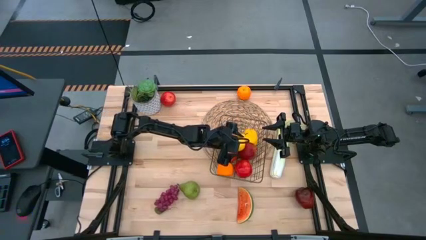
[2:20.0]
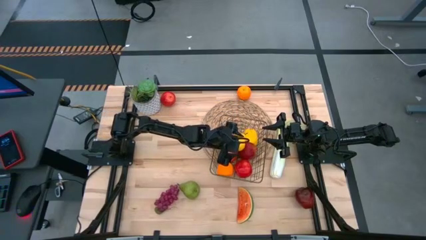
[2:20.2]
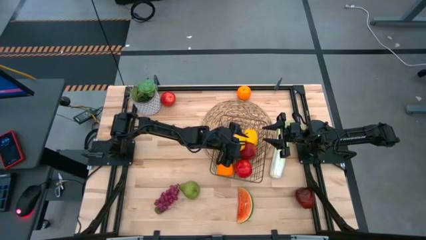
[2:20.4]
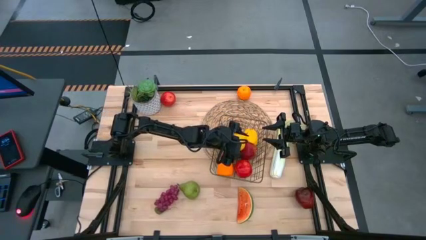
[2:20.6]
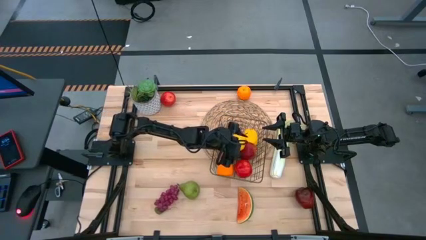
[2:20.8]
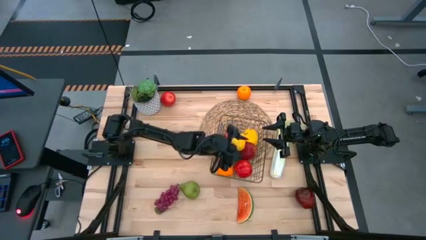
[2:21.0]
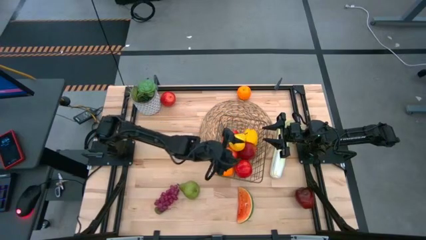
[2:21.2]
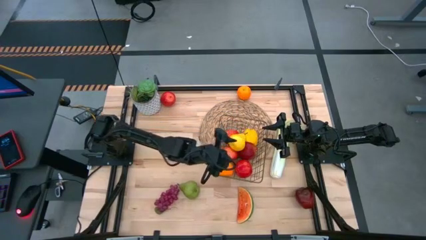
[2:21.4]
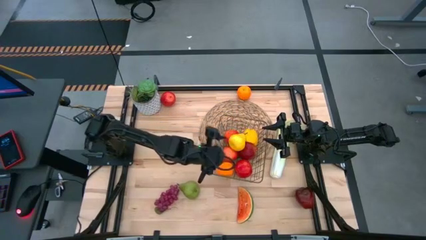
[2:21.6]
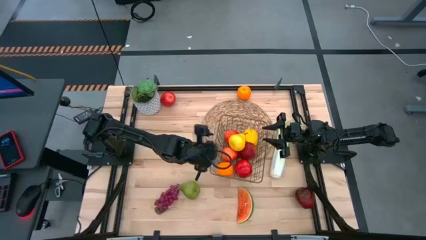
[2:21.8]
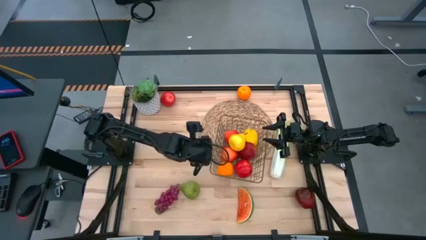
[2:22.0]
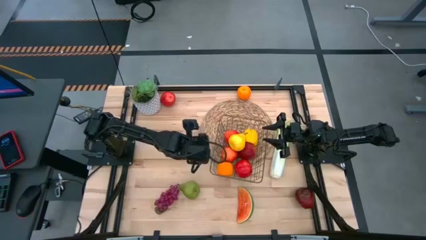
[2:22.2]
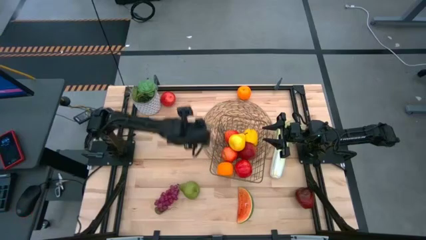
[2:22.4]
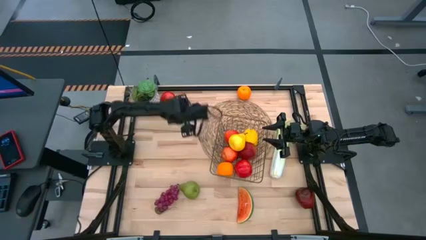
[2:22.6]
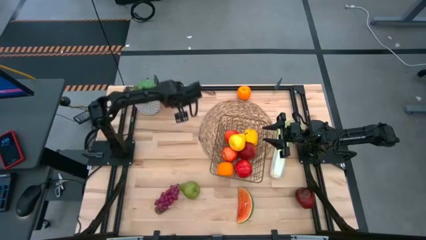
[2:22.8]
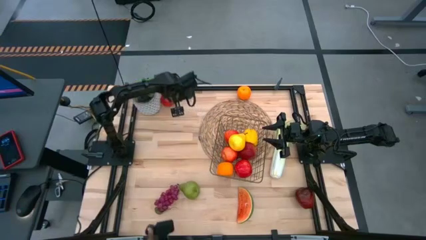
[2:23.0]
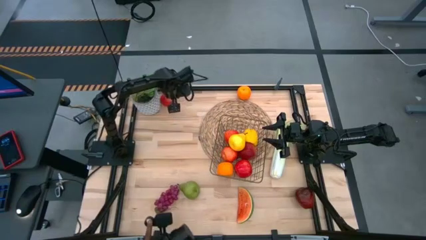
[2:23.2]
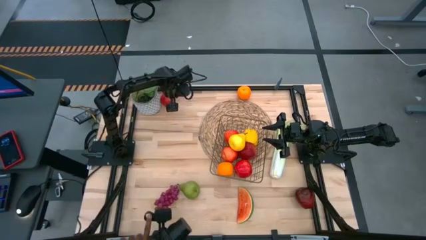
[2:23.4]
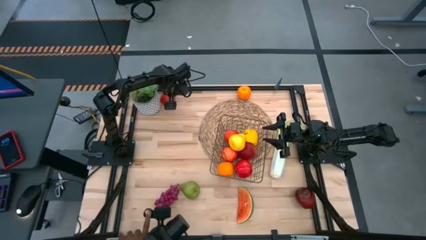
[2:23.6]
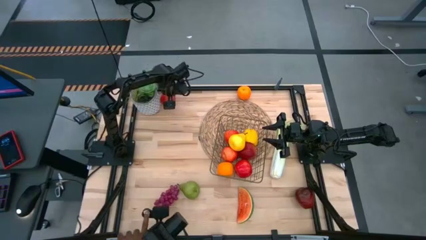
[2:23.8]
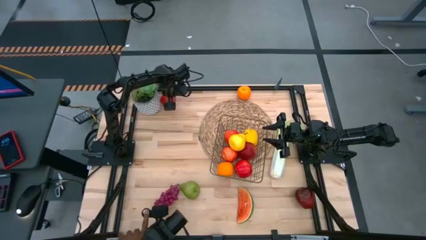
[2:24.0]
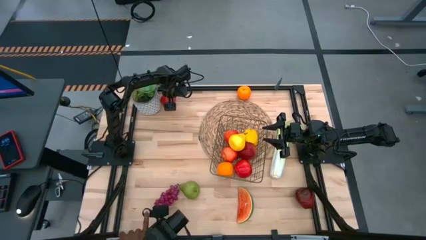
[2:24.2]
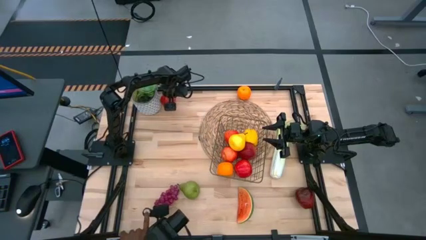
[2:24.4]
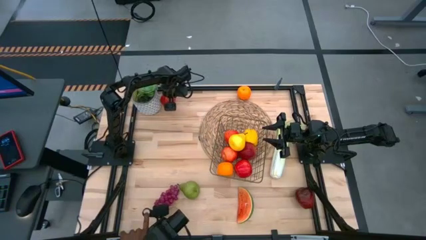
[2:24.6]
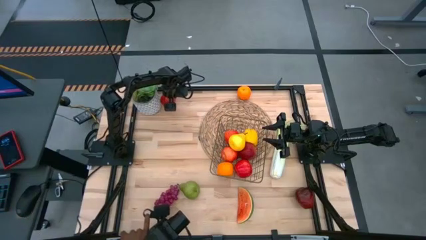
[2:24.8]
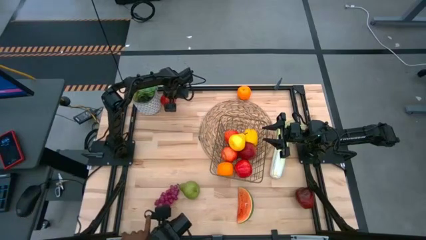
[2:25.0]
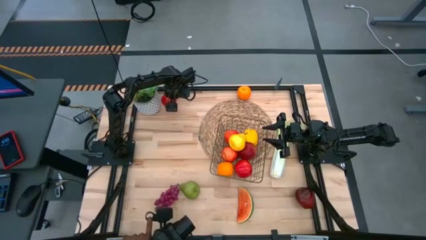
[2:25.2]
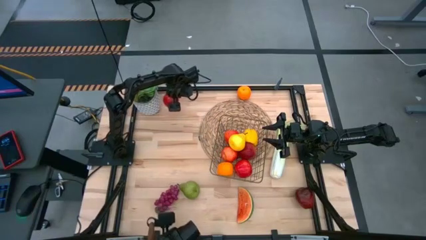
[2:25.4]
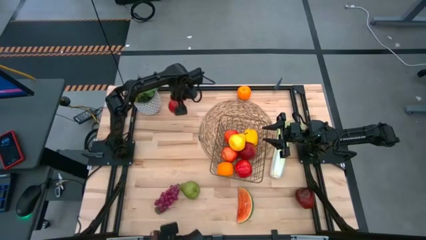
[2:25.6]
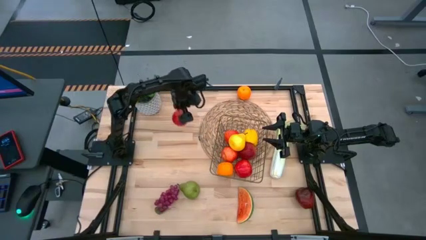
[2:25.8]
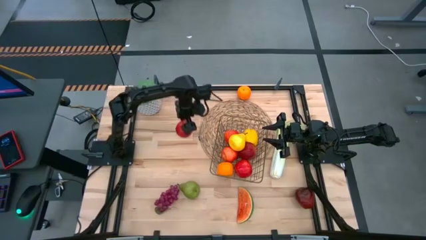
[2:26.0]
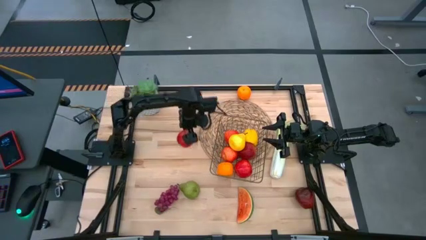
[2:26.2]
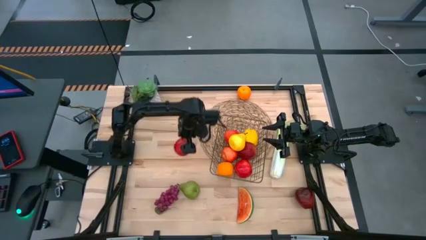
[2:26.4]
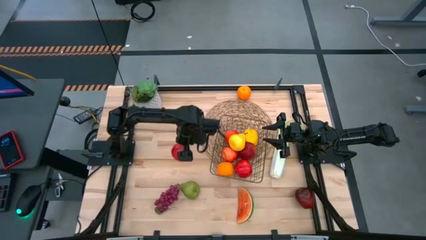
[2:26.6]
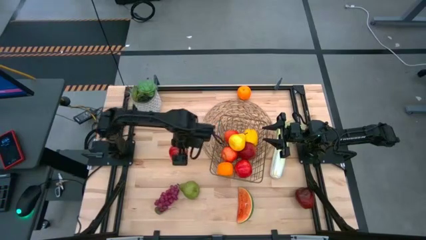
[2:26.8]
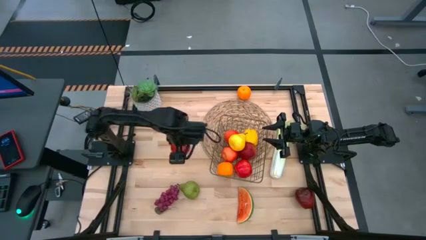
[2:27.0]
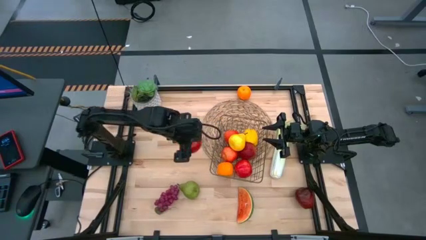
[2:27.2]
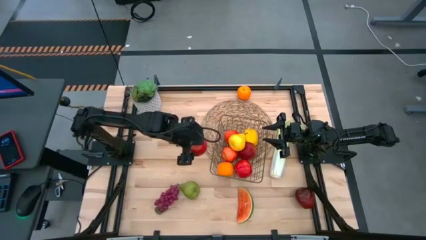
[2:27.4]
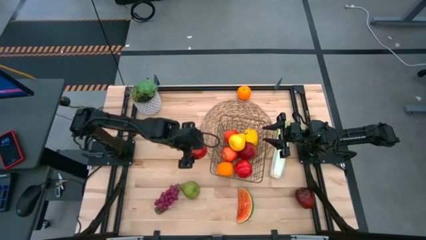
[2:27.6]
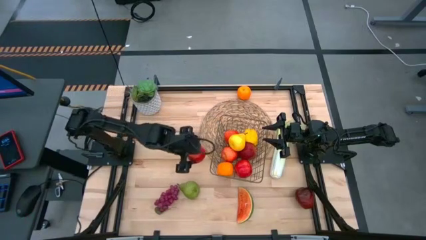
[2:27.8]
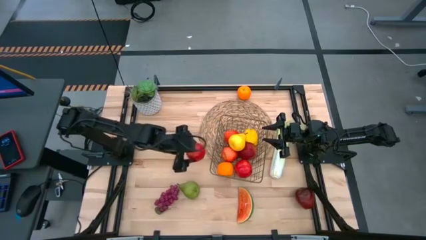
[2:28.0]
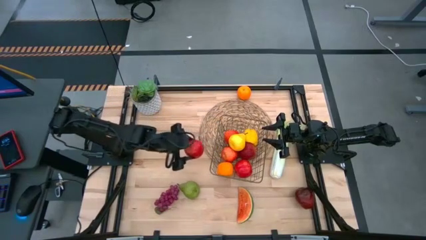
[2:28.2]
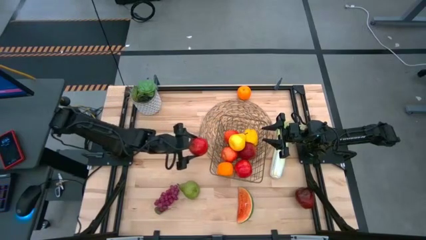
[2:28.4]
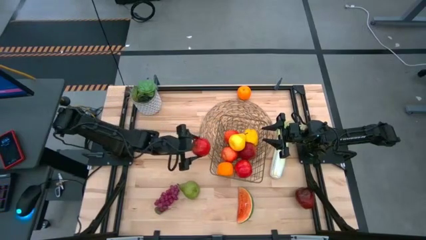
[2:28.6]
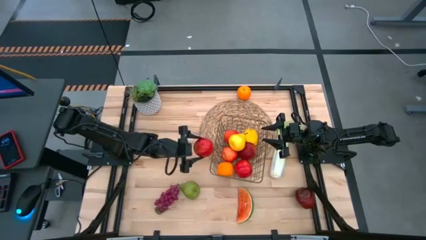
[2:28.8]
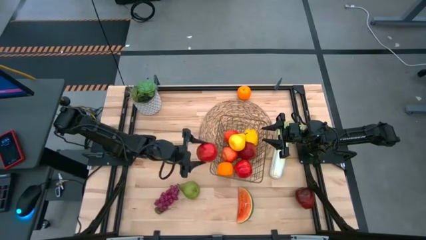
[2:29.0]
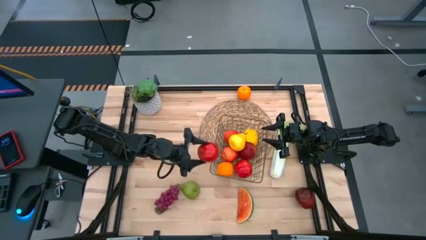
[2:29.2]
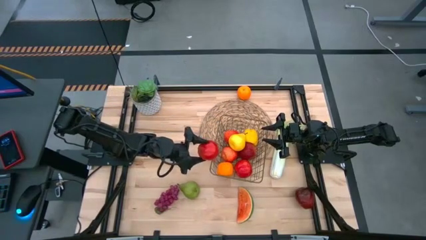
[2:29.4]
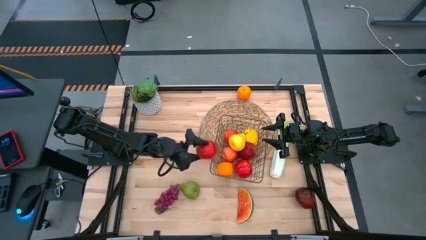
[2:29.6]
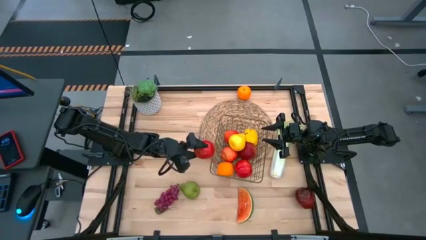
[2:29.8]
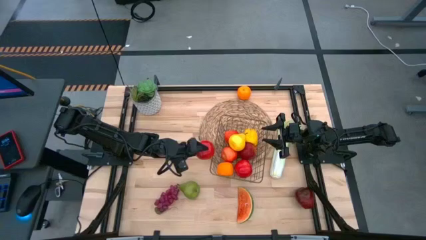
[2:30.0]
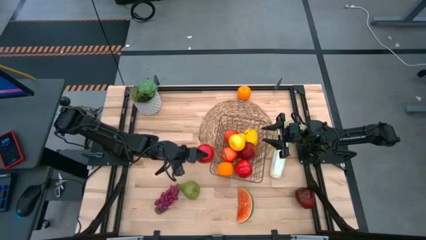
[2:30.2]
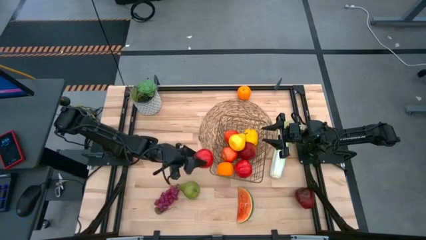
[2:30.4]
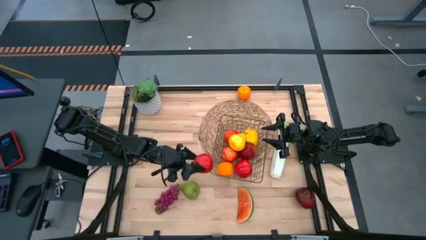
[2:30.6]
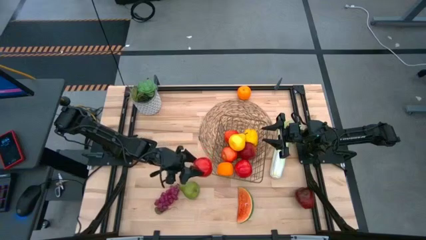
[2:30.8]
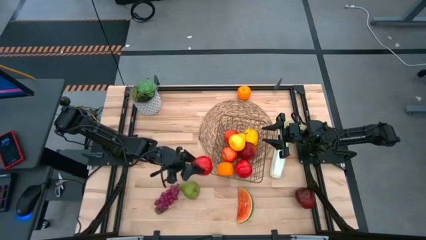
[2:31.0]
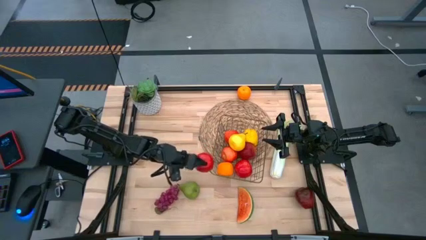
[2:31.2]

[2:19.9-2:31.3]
Task: Build produce basket
Put the red apple into the wire basket
